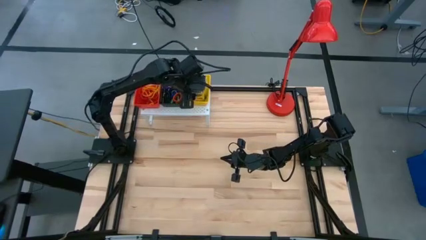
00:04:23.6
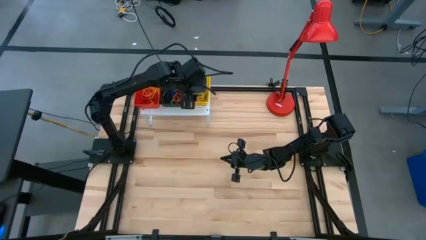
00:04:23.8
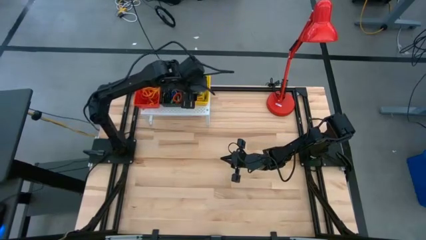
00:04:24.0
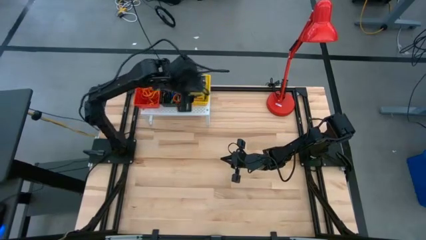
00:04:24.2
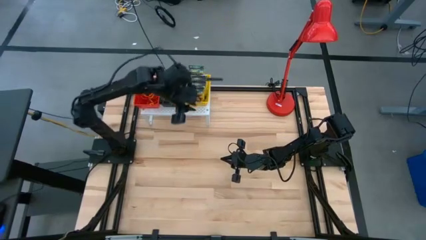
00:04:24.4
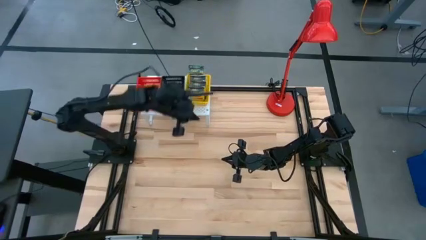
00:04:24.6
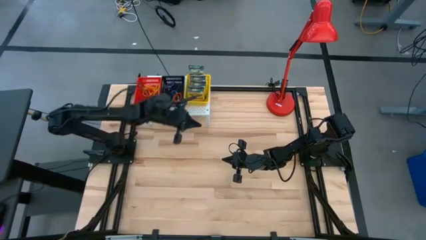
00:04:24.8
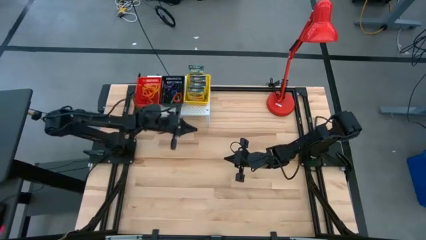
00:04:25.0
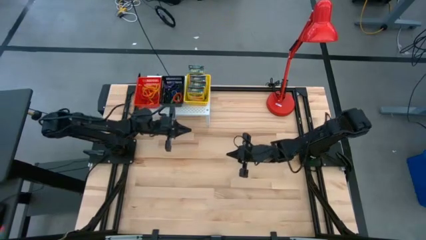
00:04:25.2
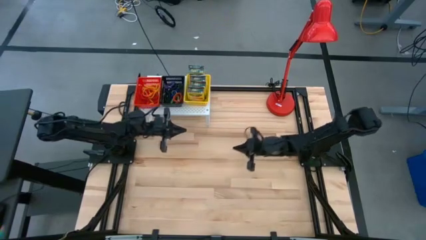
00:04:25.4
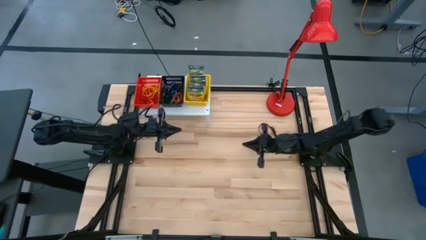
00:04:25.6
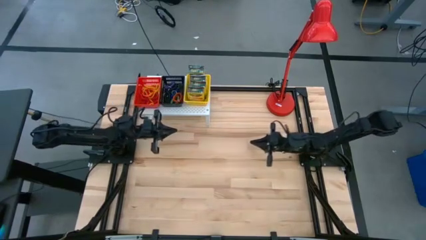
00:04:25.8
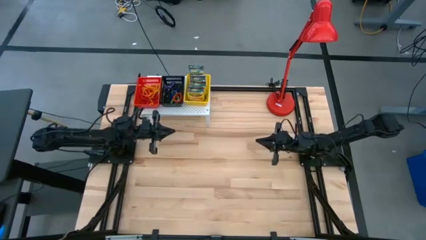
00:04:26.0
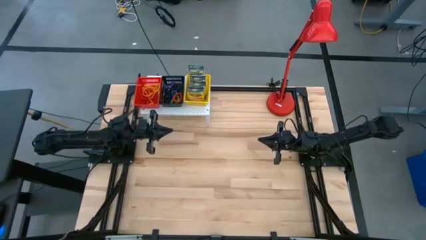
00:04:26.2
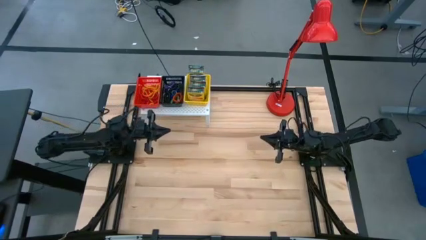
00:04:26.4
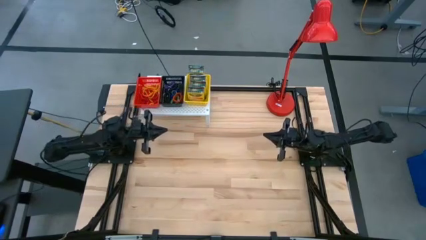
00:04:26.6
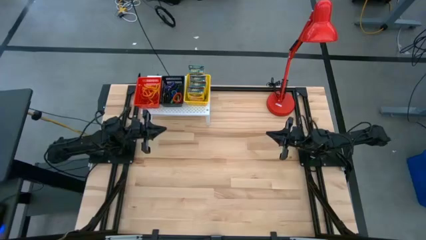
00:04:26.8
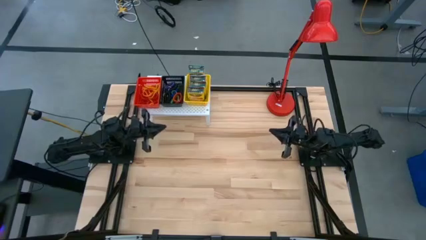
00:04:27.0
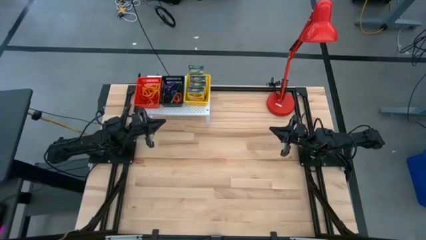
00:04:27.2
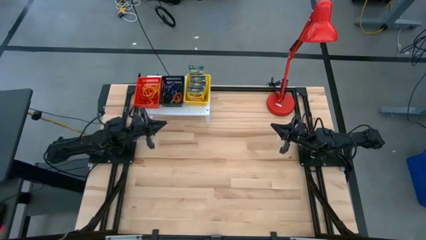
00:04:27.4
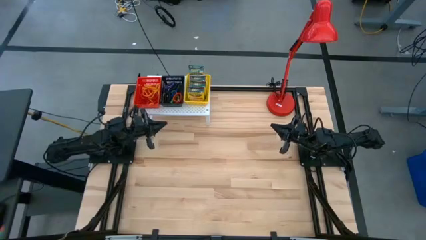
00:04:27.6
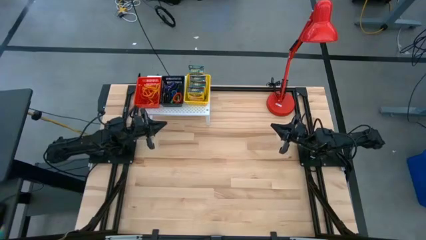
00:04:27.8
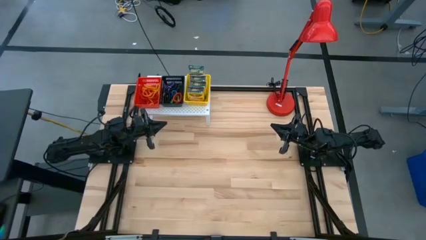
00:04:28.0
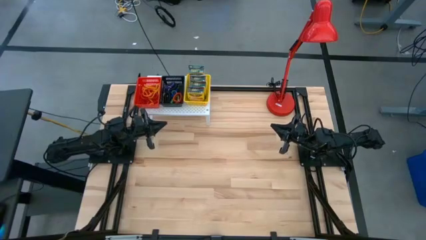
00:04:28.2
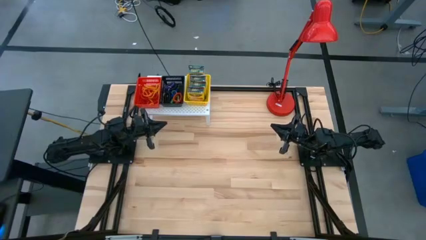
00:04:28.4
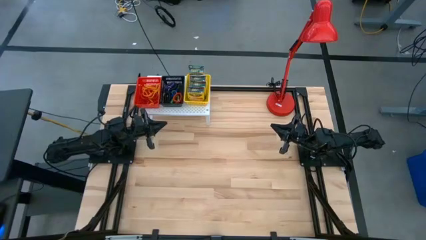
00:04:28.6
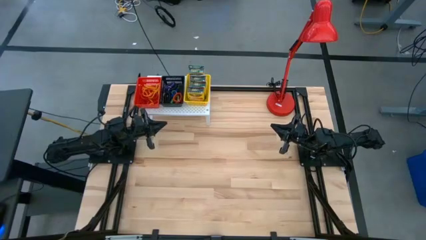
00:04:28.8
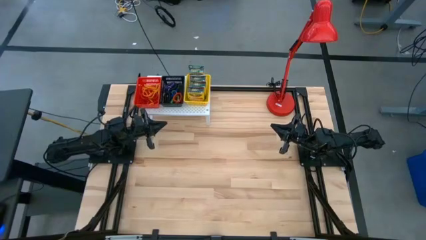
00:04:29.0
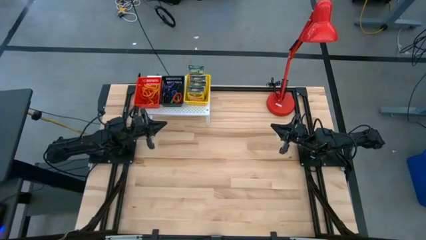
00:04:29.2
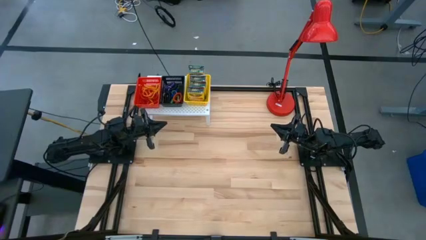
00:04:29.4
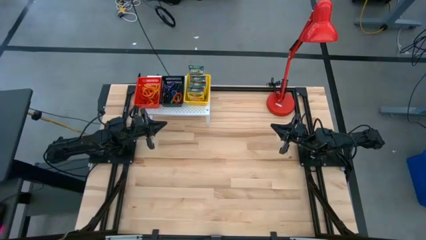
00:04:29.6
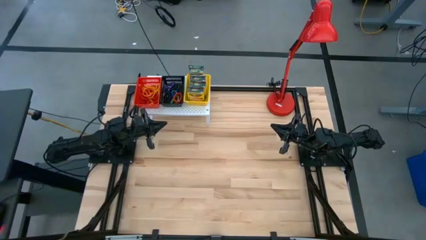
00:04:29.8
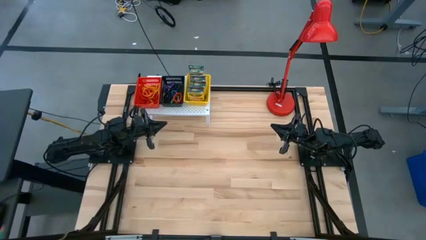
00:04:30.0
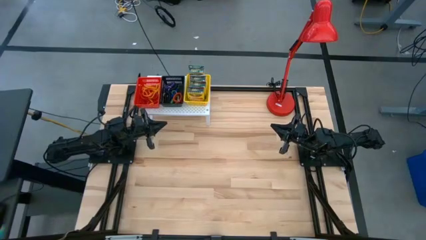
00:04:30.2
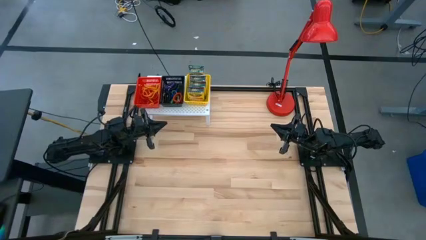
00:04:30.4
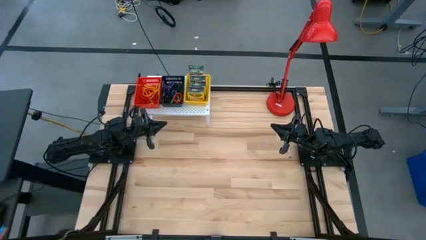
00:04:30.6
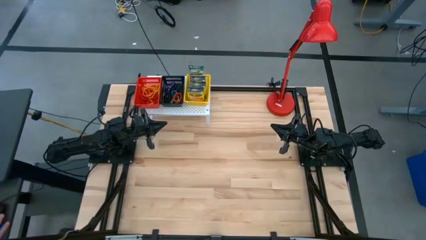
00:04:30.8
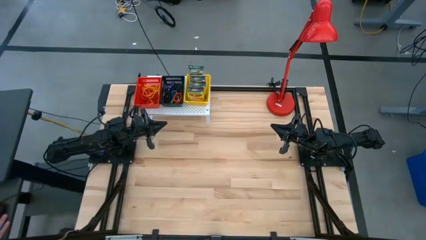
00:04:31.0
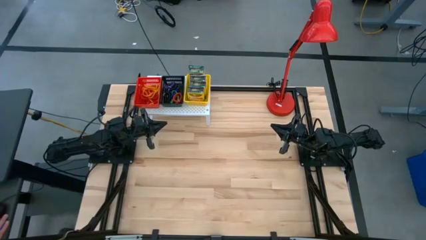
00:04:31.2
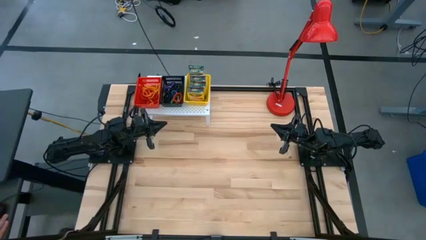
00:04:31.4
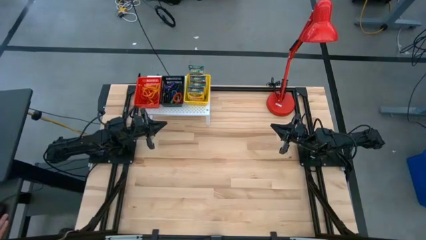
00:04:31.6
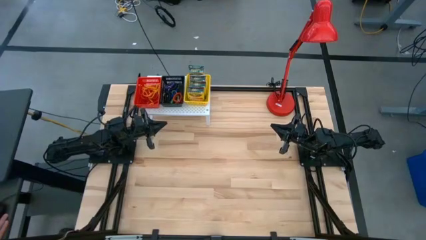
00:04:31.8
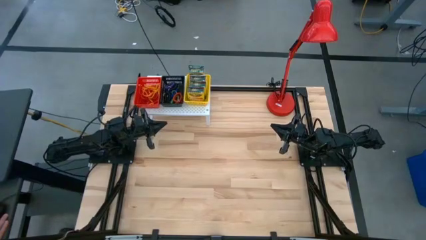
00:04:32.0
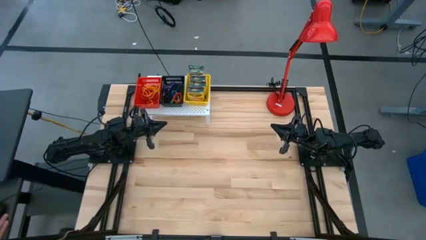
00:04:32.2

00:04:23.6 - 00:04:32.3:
Task: Pick & Place Office Desk Supplies
Return to Home Position

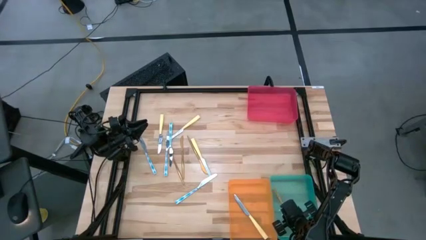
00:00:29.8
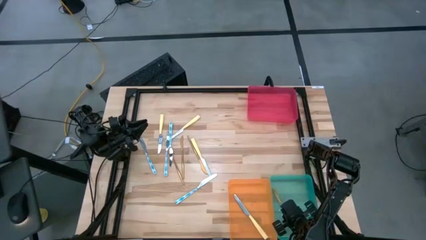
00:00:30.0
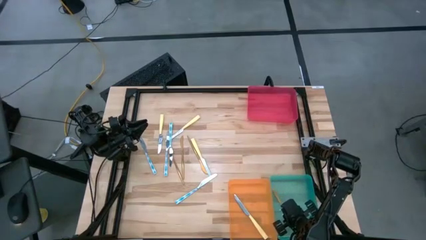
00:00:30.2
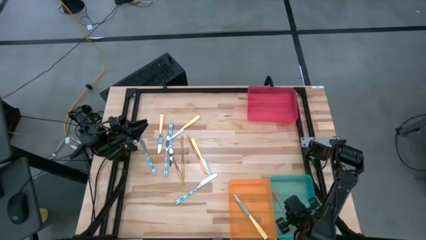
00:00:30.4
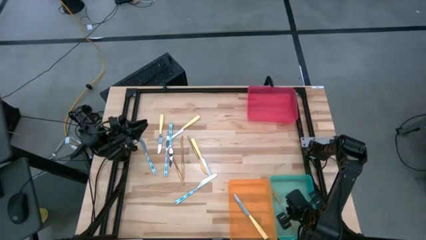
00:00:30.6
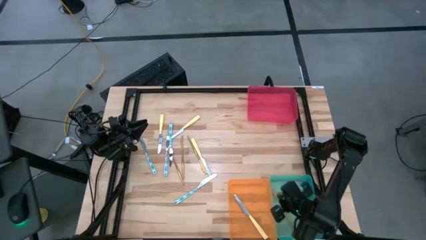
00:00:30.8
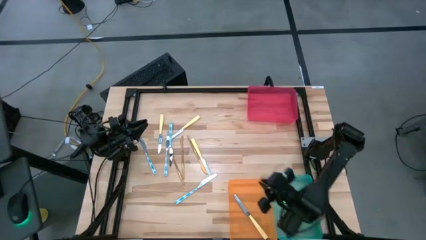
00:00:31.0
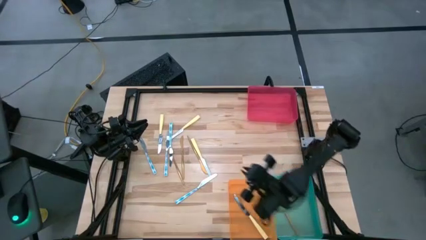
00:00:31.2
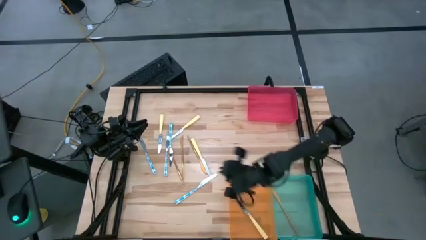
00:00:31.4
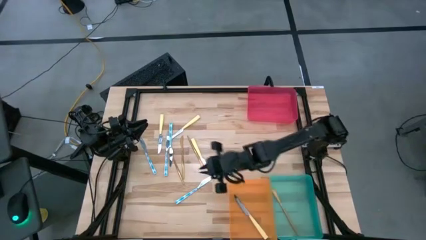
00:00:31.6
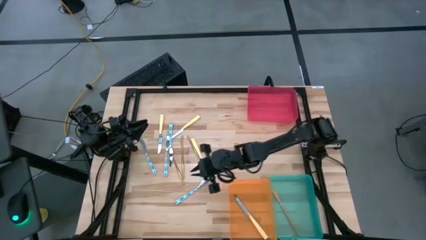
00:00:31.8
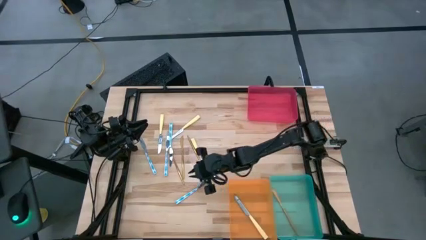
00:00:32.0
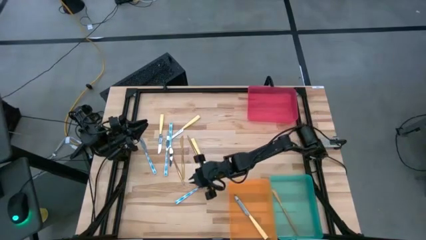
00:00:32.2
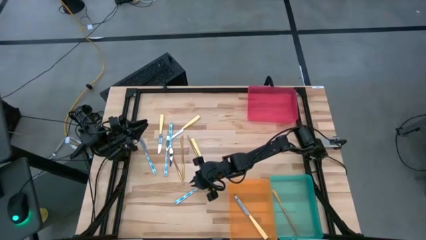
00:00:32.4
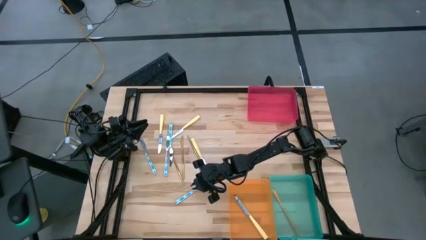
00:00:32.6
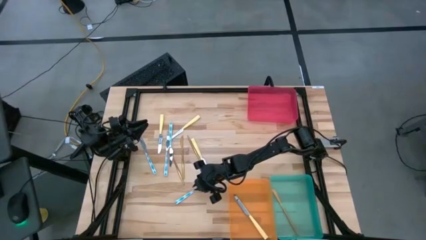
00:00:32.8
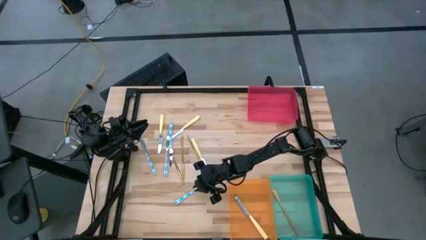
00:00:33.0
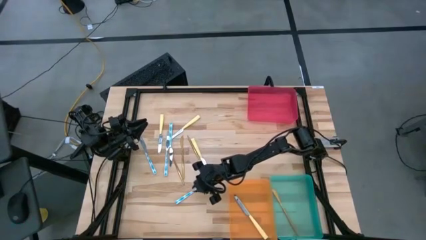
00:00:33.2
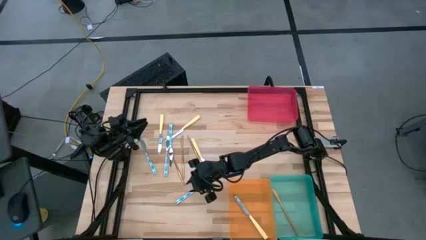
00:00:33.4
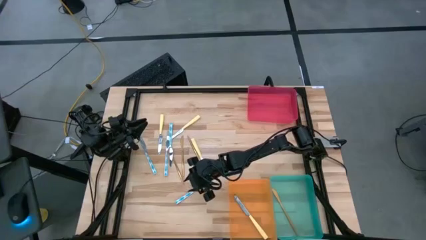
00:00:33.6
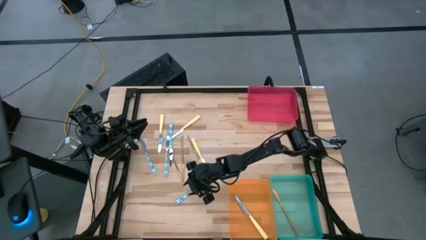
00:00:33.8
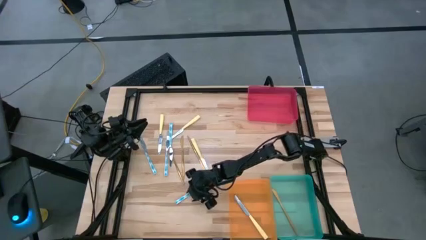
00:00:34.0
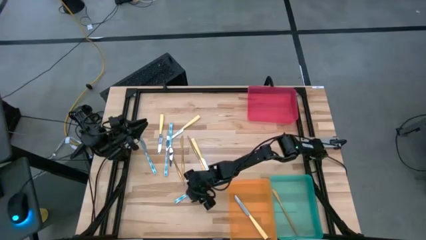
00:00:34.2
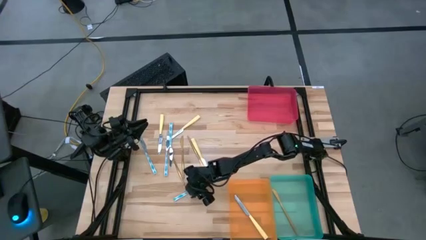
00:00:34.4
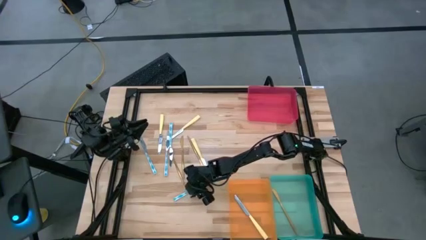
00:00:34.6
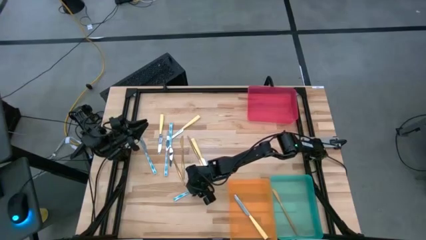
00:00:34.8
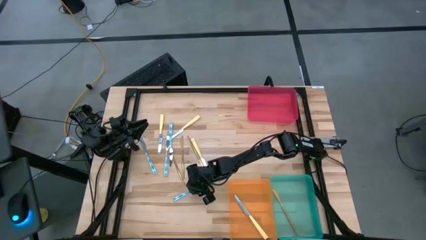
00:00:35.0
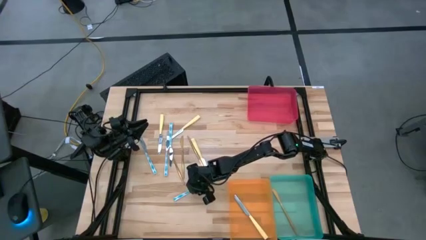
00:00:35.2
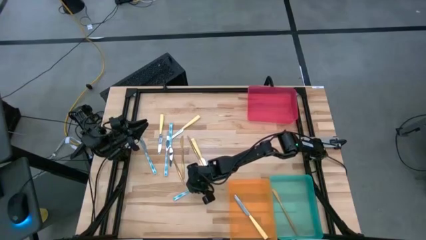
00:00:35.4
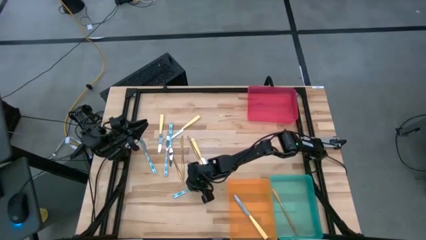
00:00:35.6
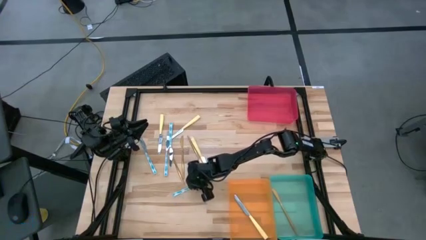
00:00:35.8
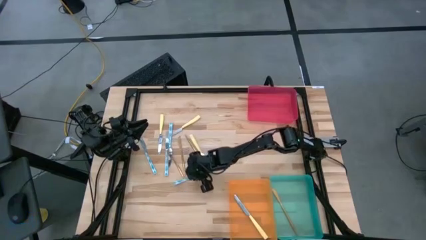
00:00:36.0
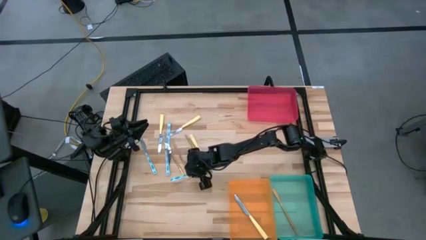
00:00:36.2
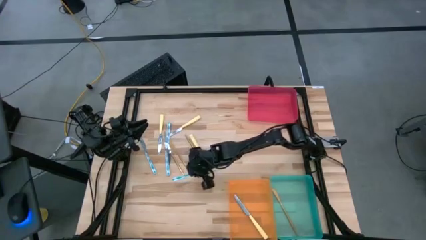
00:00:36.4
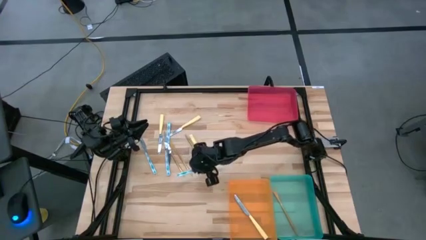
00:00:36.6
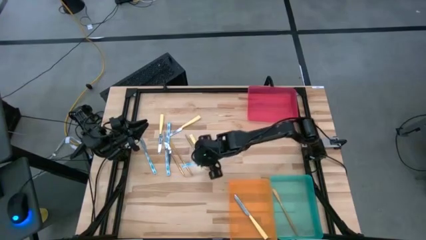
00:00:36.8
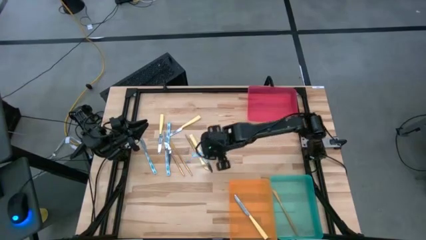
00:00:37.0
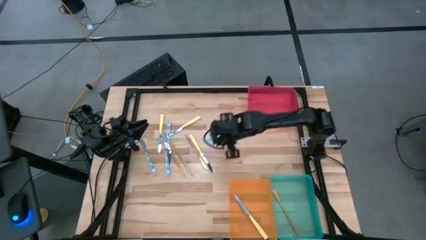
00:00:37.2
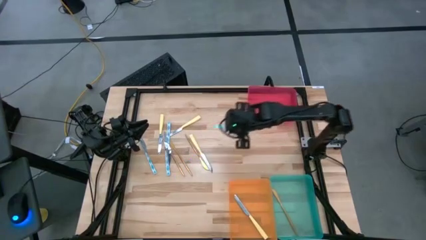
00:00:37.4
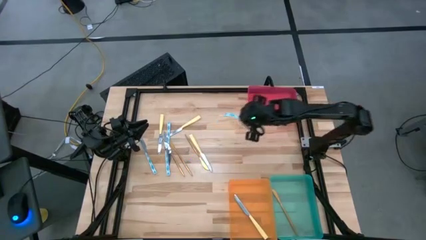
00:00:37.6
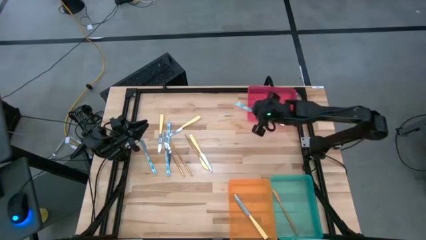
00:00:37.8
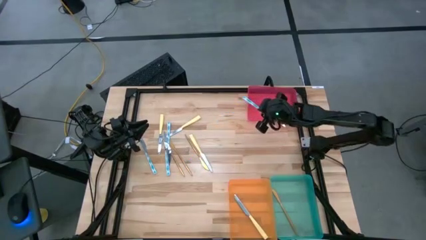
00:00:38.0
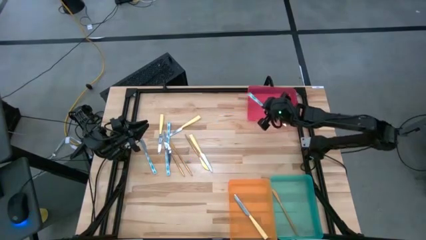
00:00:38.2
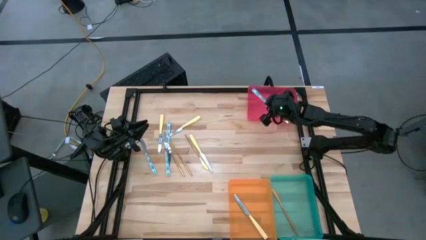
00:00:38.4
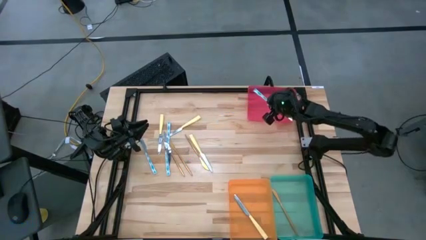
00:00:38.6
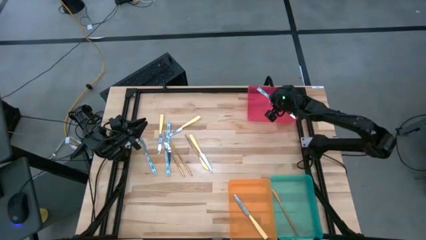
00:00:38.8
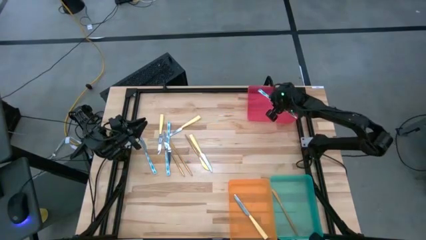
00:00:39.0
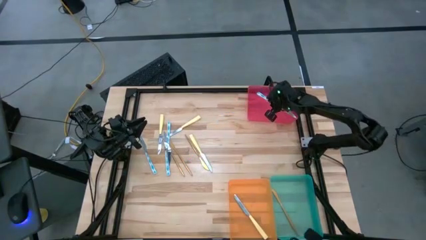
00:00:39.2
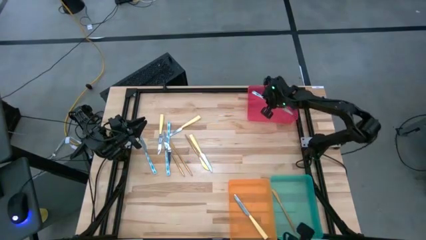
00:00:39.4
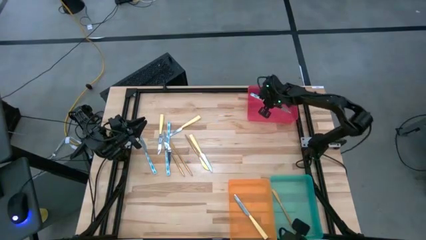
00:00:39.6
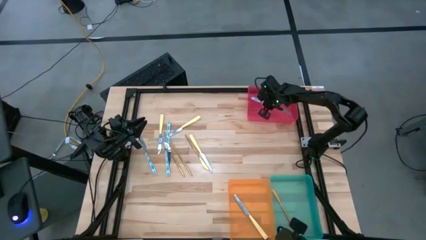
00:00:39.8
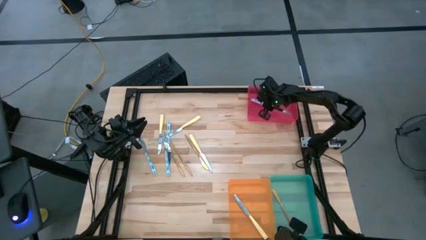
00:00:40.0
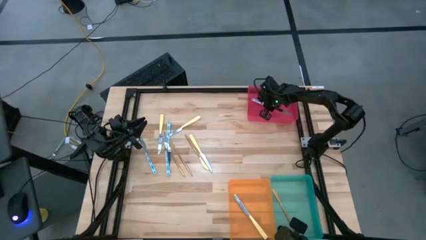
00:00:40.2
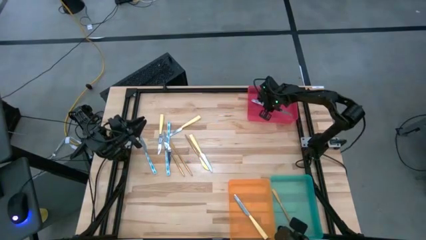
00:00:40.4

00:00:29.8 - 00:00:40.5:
Task: Sort silverware by color (type)
Put the blue patterned knife into the red bin
